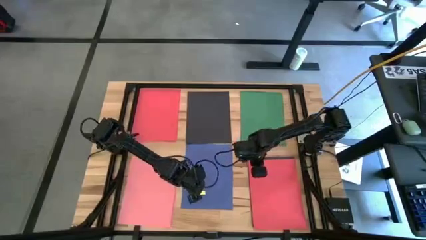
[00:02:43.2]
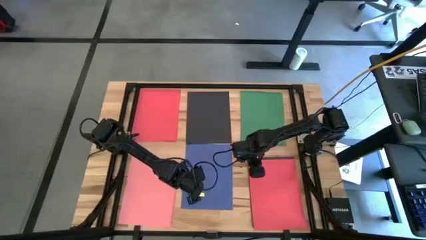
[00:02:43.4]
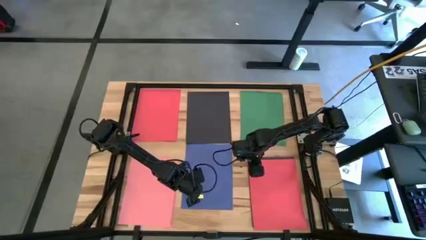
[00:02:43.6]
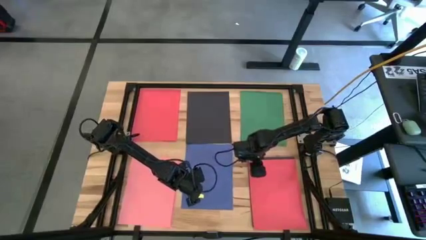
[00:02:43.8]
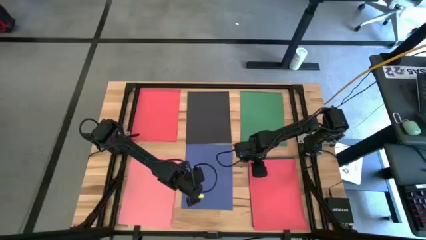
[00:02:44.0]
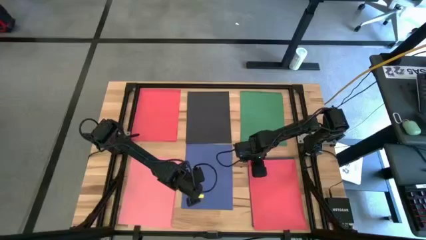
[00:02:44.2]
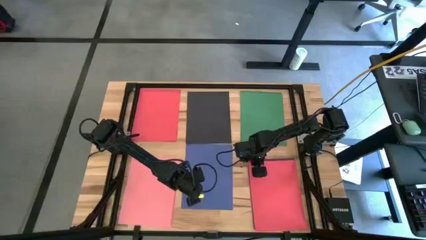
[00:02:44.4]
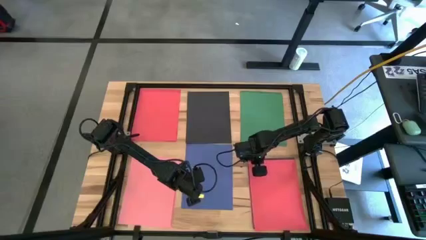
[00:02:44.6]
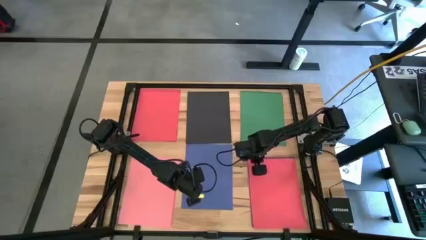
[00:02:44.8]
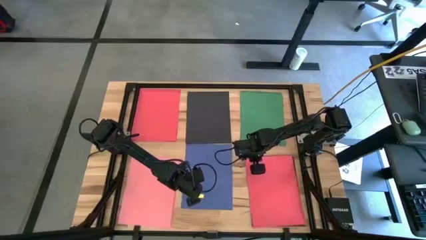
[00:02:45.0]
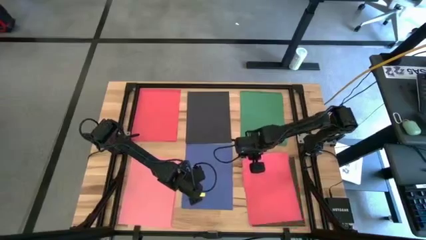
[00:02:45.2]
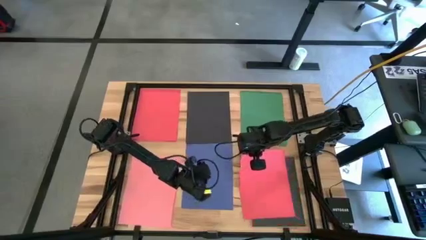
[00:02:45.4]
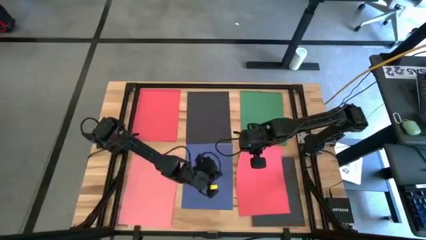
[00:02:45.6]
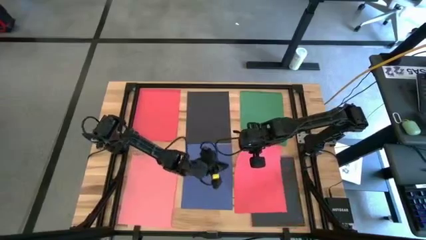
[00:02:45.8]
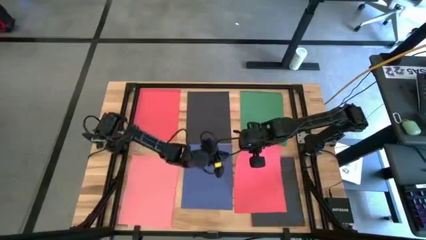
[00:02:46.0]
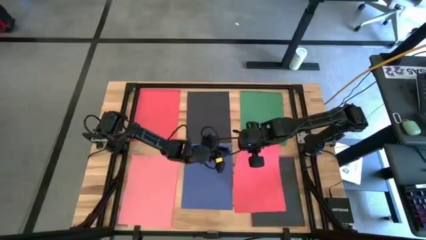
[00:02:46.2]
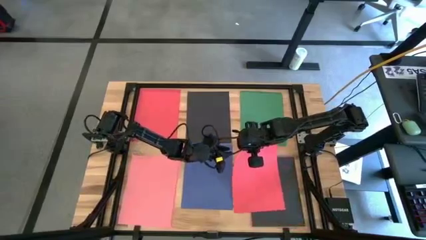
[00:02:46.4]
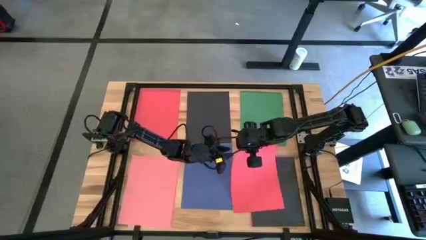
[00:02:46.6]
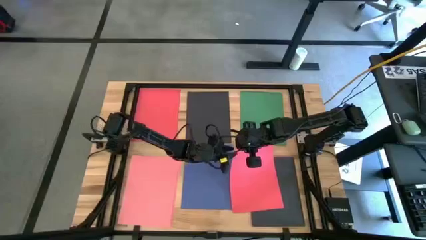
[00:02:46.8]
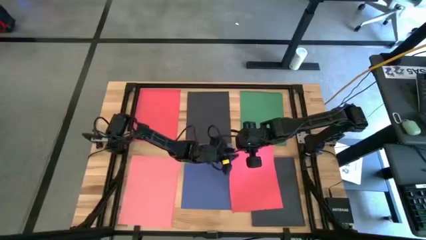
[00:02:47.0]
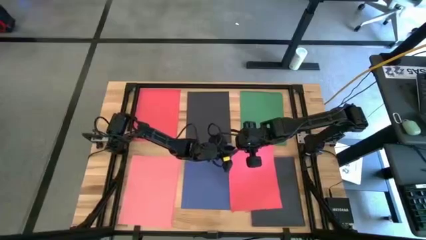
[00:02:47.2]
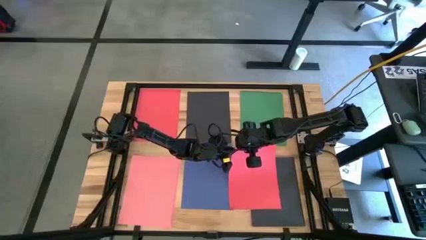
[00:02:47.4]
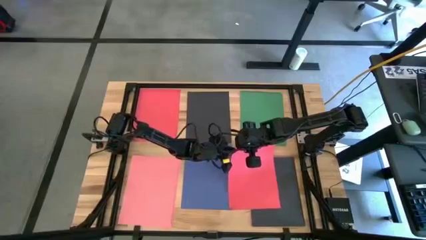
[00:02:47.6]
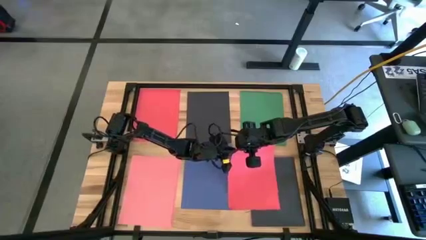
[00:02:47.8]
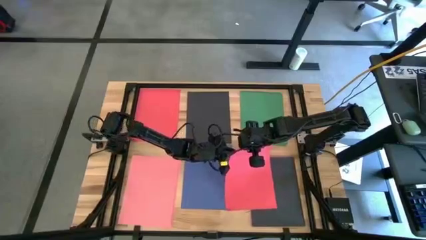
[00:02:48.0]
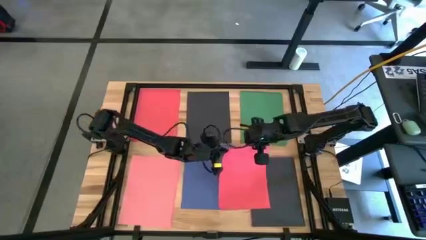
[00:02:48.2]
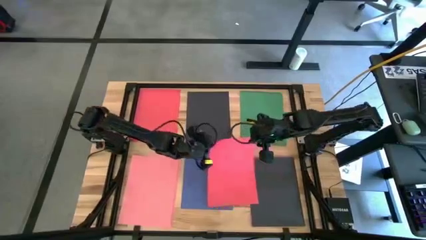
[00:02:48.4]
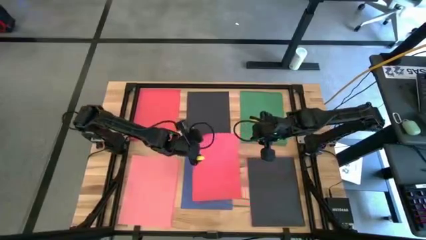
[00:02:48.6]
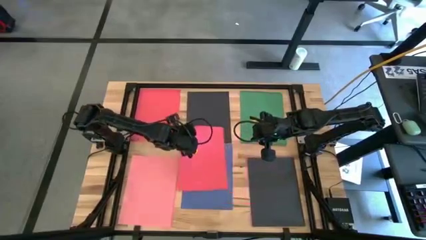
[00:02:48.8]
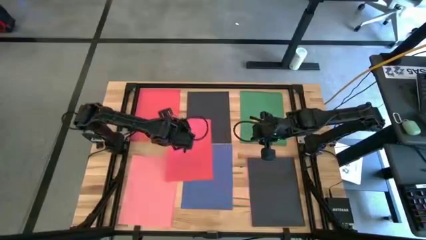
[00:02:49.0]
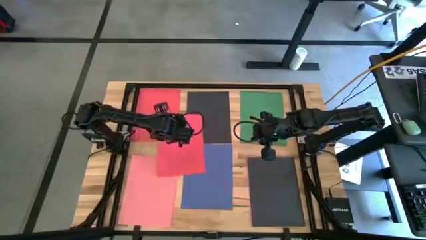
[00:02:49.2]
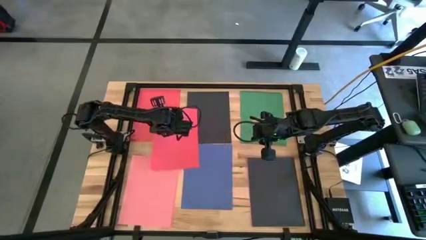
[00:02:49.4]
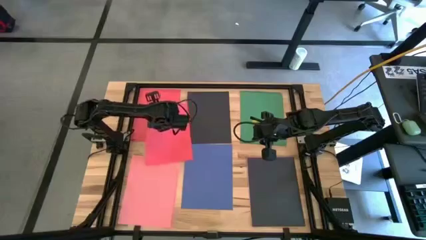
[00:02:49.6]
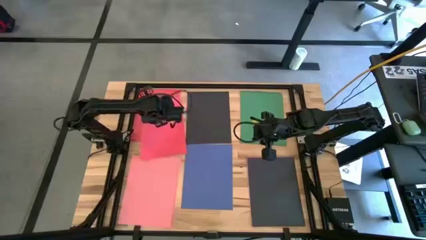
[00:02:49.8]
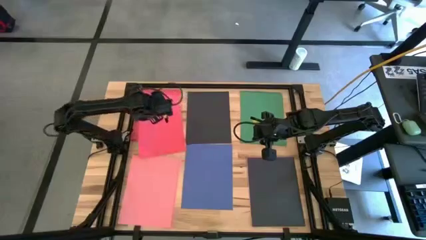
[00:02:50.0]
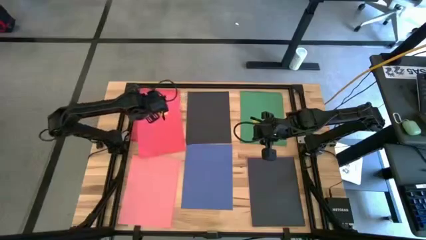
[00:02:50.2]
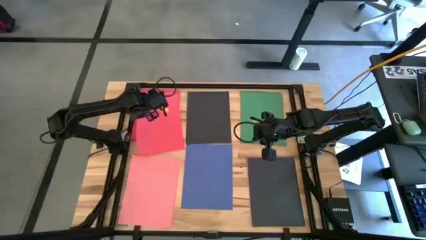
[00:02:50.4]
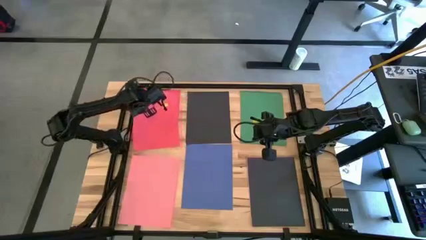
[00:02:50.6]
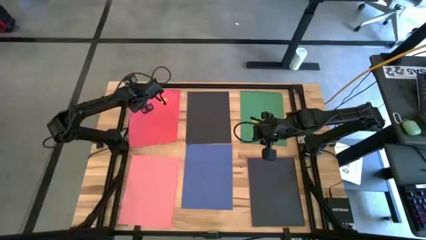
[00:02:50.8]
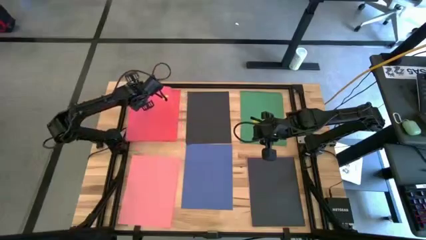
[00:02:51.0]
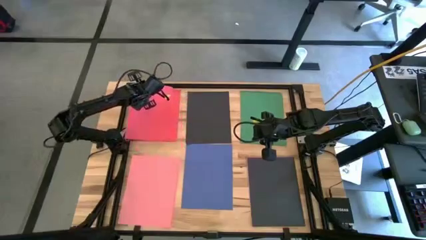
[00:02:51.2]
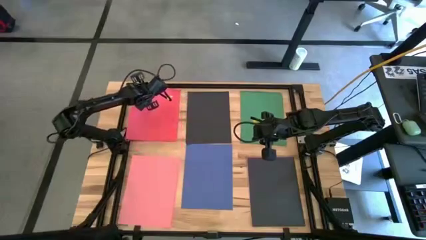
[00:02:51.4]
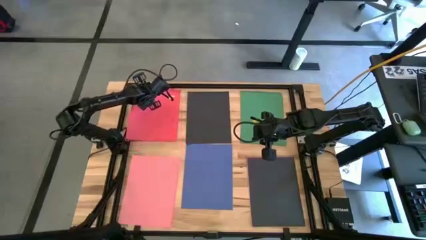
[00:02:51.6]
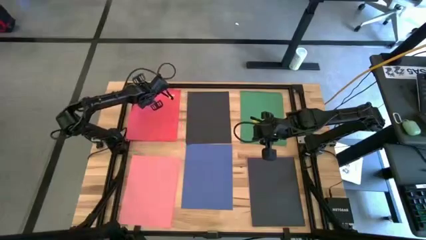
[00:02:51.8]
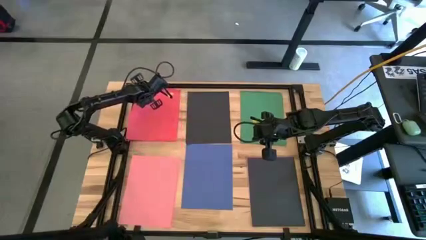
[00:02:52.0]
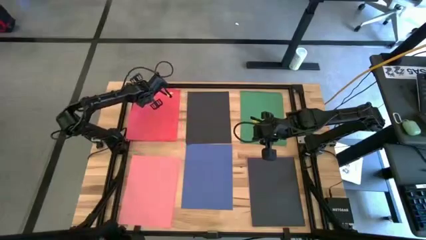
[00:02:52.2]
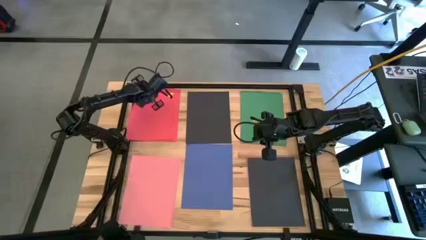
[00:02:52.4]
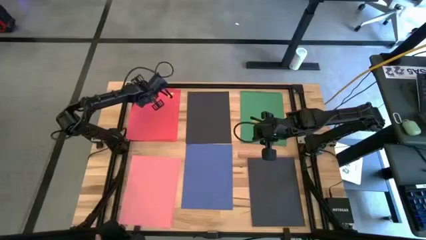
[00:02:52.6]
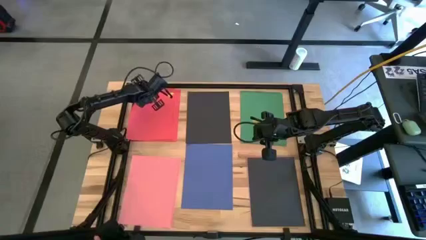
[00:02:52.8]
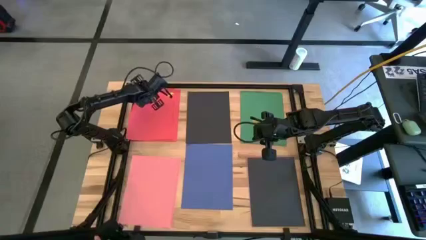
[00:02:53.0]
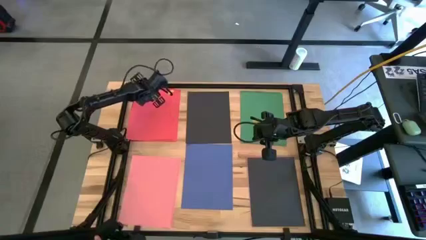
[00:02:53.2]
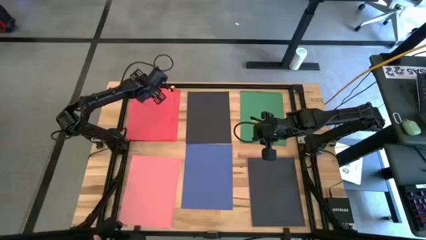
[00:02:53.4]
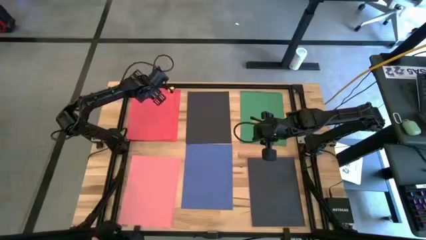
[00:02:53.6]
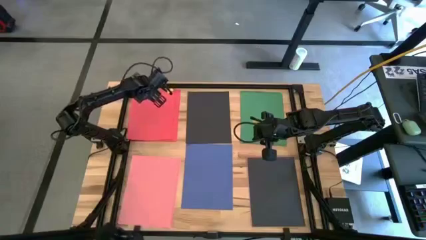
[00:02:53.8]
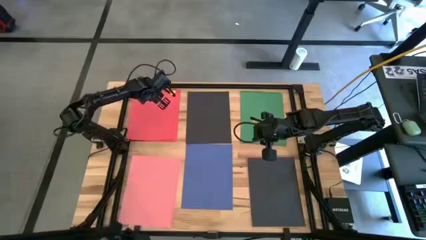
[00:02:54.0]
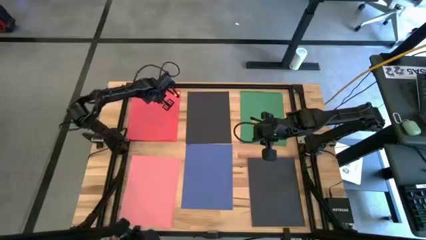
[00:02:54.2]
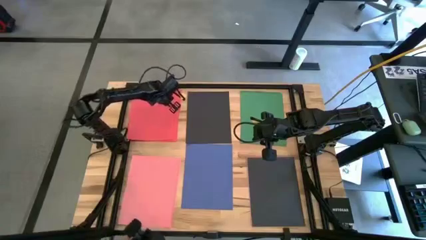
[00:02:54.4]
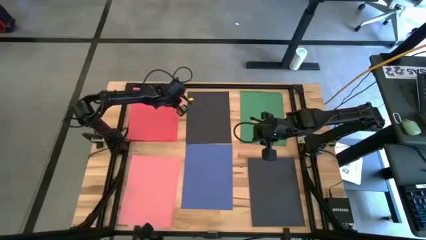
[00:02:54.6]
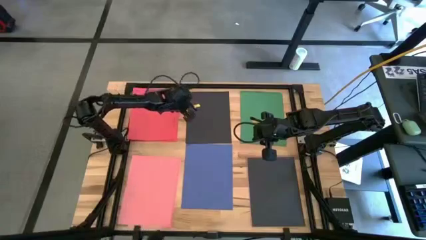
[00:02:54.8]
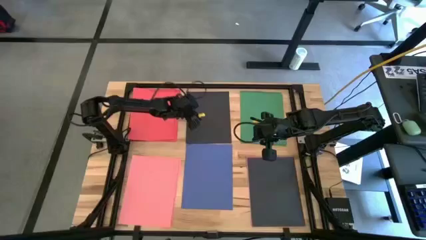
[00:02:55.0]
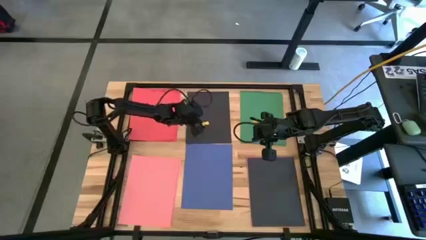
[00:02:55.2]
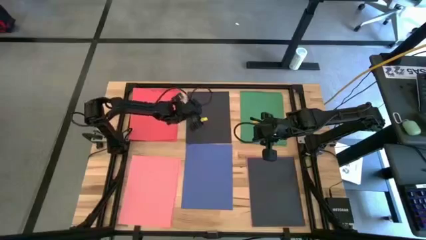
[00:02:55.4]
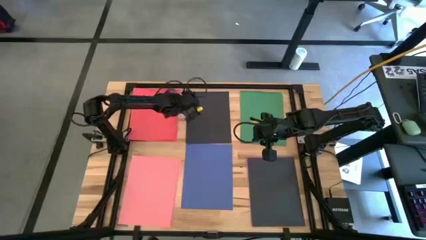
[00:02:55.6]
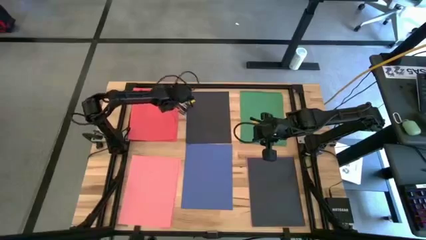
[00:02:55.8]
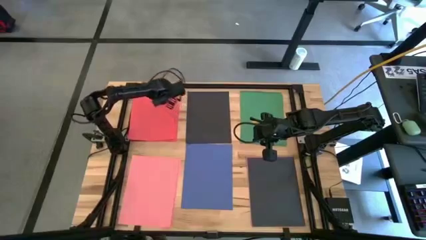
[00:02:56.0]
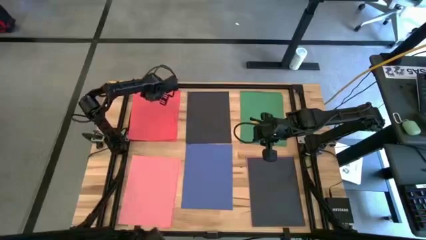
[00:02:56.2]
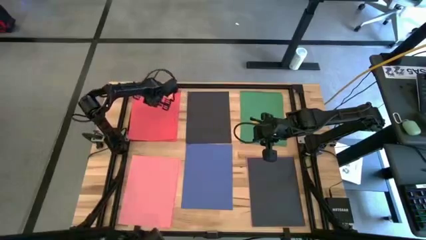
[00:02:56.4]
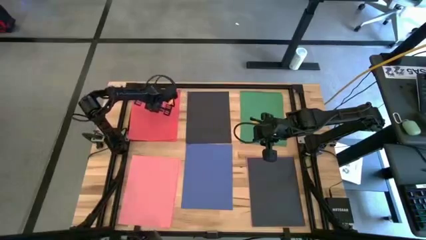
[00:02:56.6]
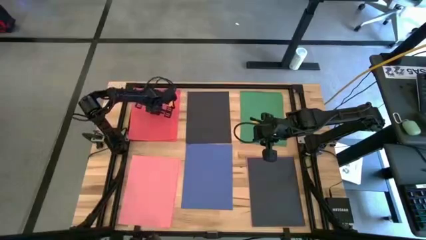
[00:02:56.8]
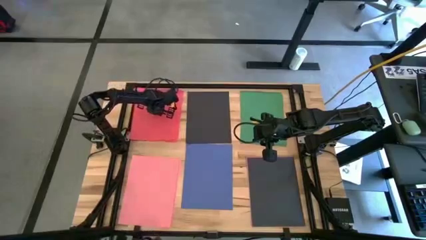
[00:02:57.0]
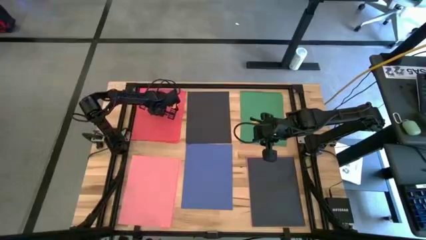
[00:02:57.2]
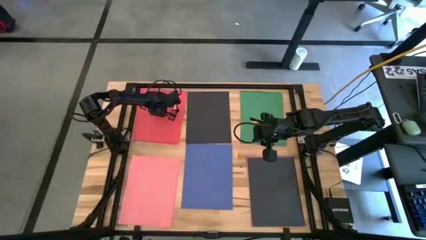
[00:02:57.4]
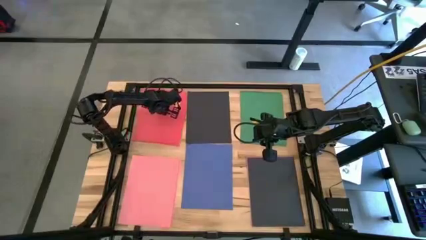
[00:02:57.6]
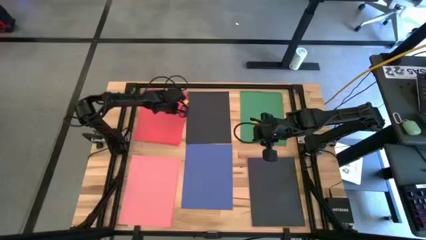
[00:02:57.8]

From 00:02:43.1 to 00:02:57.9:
Task: Organize paper
Stack the red paper on the stacked red paper

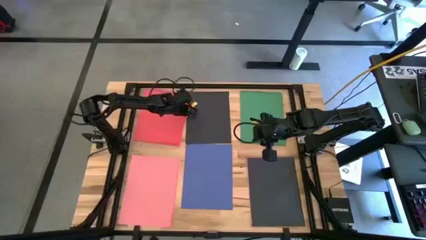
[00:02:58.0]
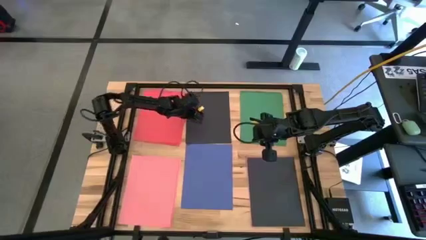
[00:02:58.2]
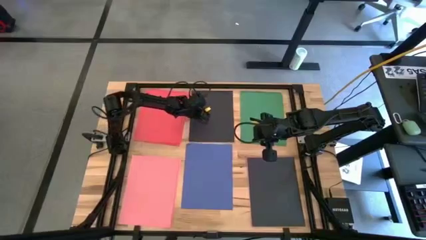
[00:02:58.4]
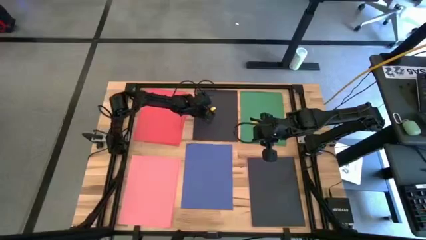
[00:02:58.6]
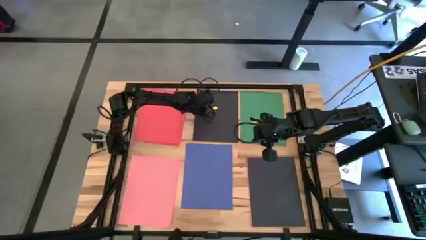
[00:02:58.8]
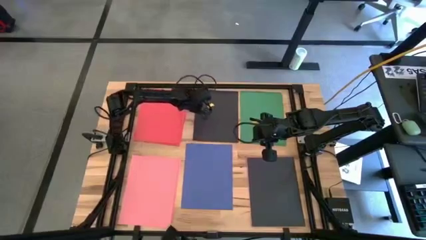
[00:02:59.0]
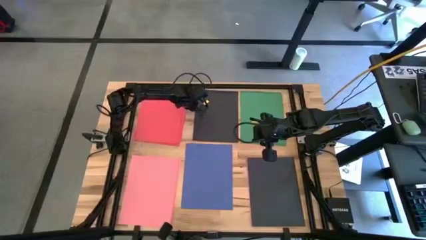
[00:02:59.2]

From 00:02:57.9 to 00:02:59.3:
Adjust the stacked black papers
